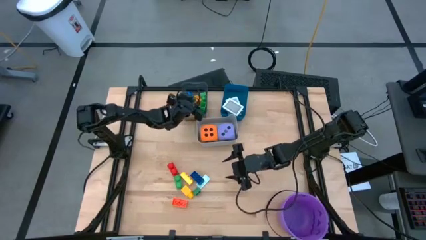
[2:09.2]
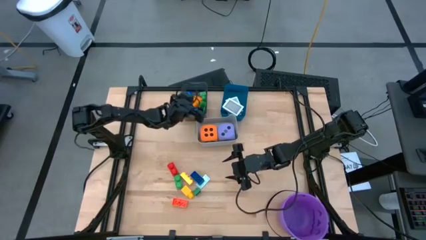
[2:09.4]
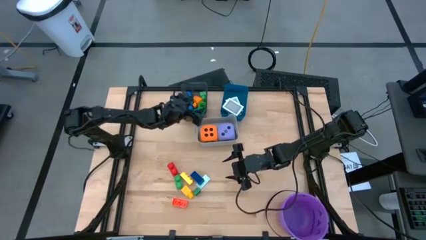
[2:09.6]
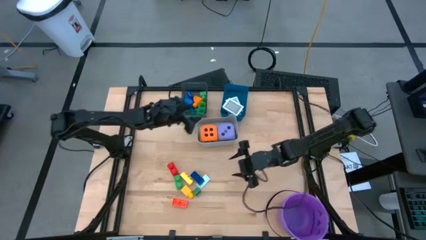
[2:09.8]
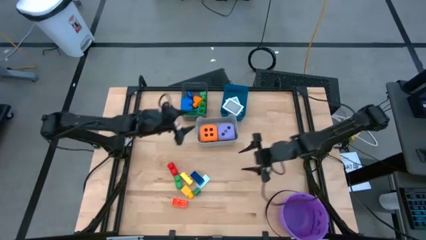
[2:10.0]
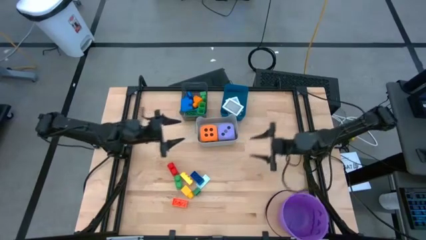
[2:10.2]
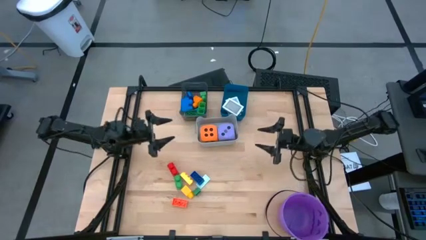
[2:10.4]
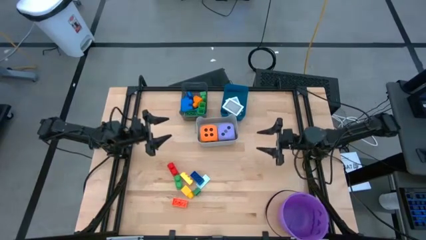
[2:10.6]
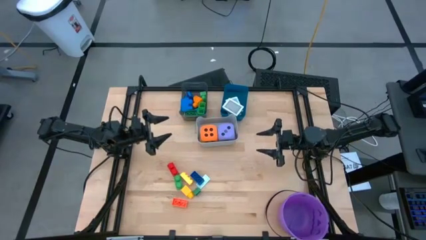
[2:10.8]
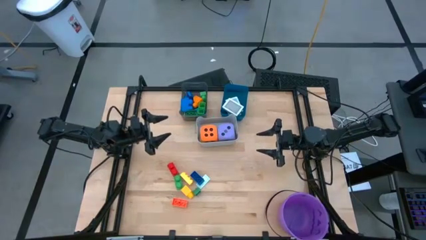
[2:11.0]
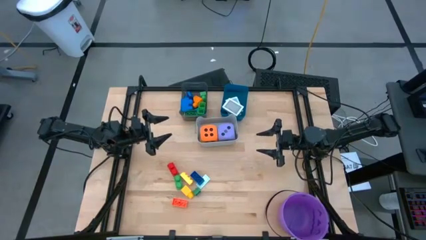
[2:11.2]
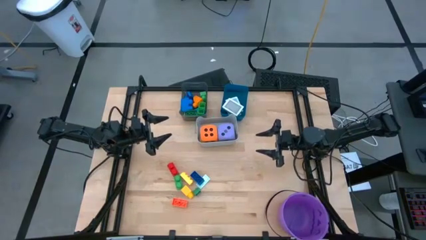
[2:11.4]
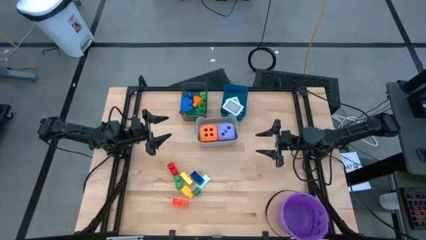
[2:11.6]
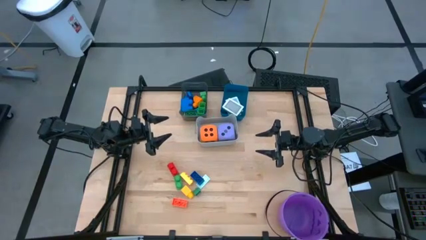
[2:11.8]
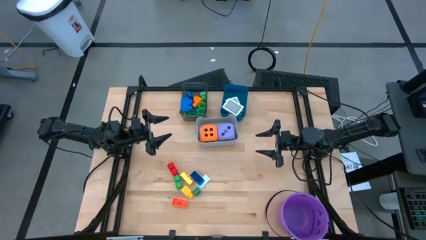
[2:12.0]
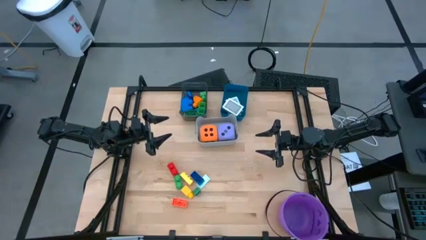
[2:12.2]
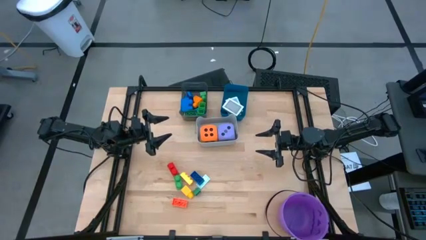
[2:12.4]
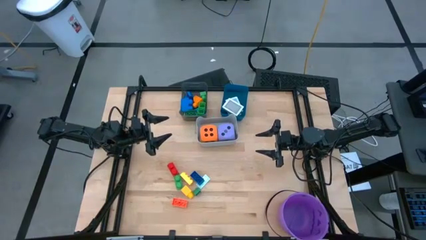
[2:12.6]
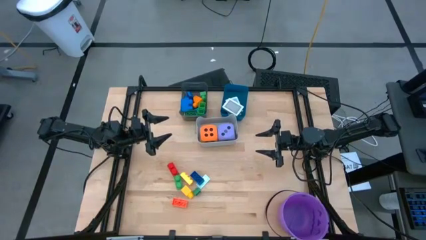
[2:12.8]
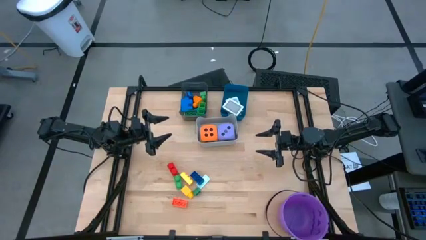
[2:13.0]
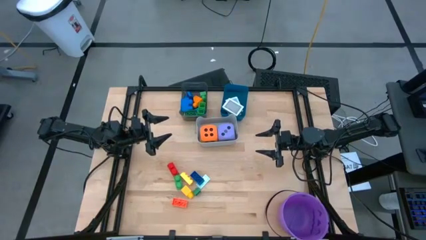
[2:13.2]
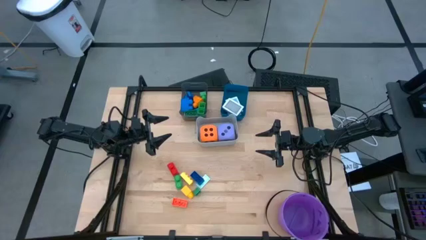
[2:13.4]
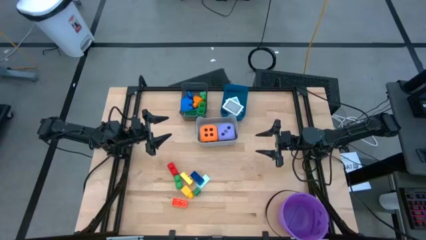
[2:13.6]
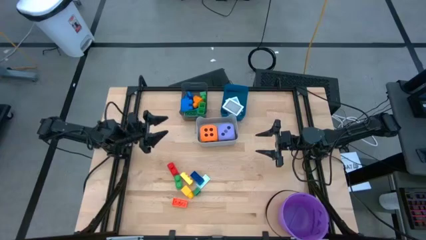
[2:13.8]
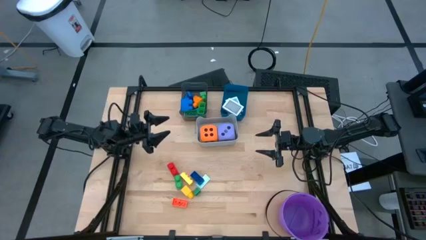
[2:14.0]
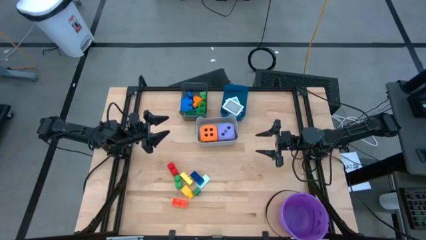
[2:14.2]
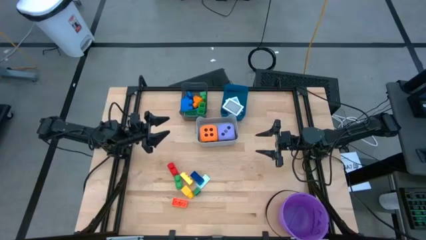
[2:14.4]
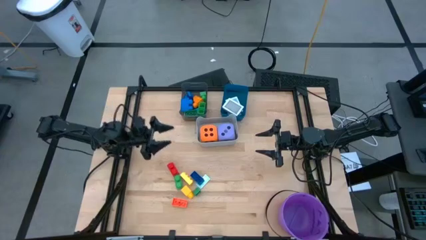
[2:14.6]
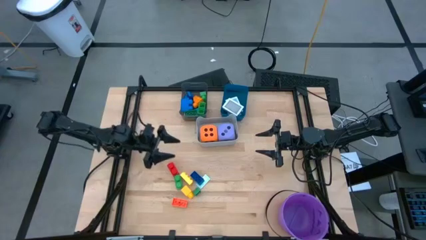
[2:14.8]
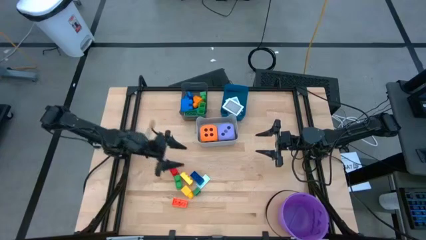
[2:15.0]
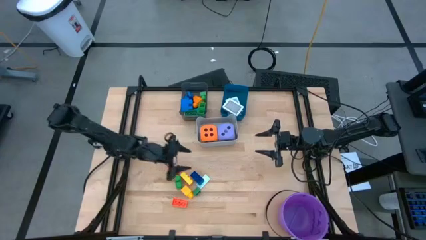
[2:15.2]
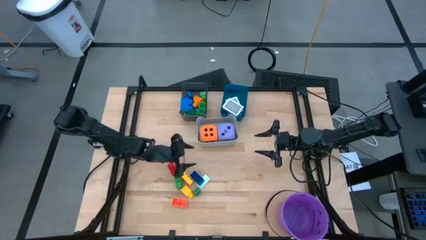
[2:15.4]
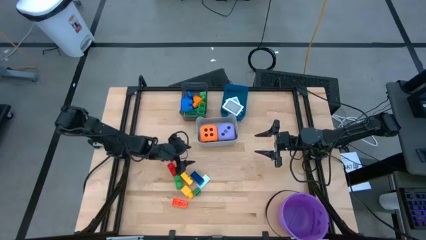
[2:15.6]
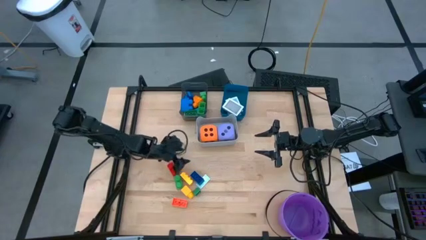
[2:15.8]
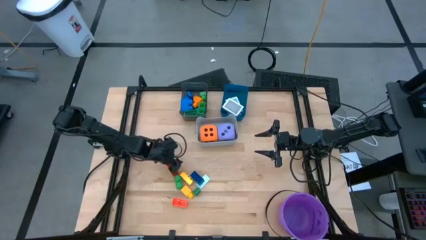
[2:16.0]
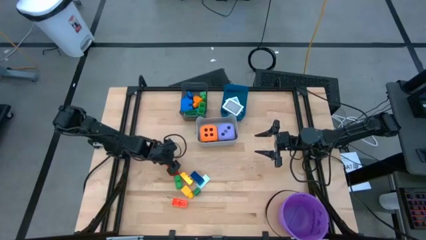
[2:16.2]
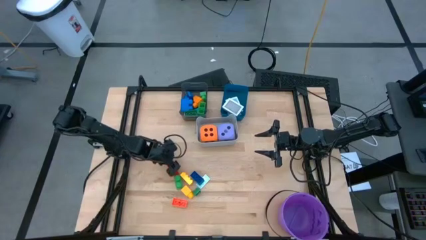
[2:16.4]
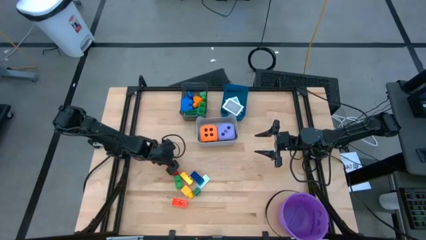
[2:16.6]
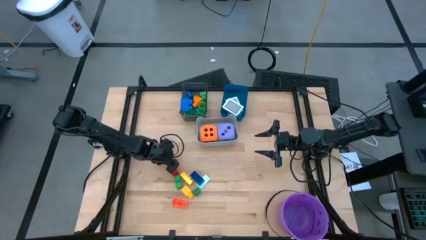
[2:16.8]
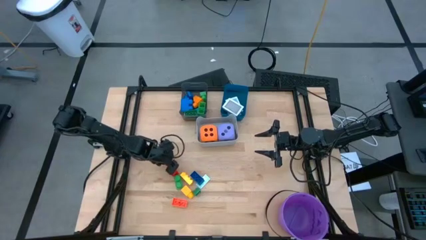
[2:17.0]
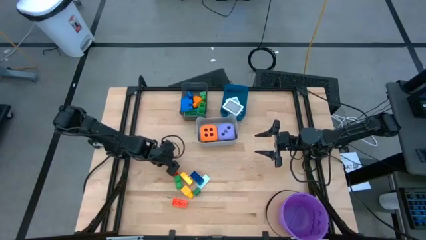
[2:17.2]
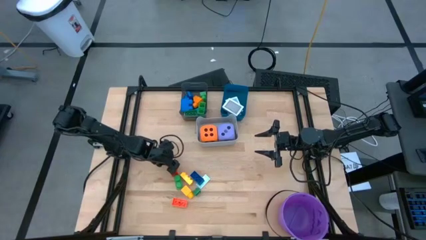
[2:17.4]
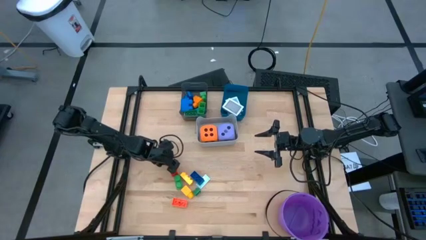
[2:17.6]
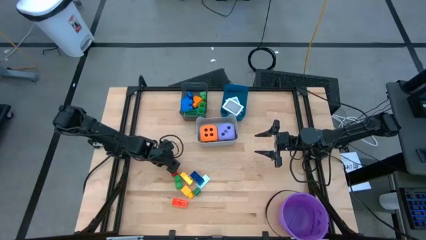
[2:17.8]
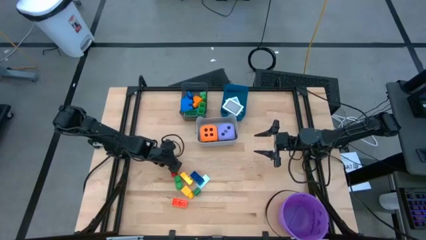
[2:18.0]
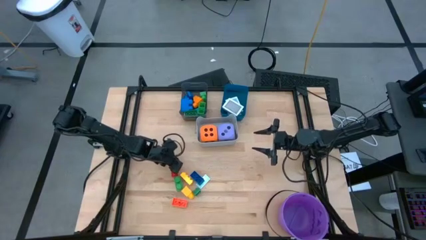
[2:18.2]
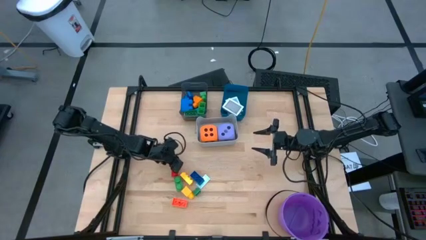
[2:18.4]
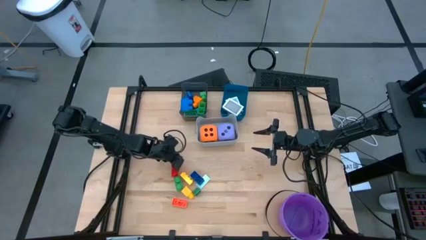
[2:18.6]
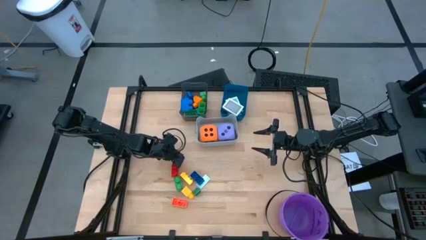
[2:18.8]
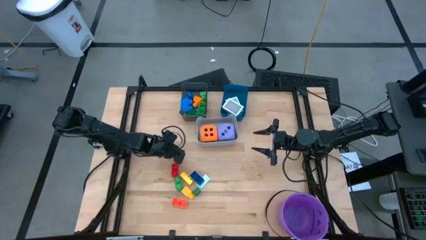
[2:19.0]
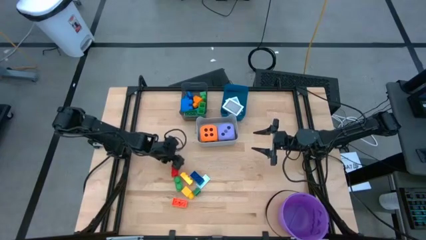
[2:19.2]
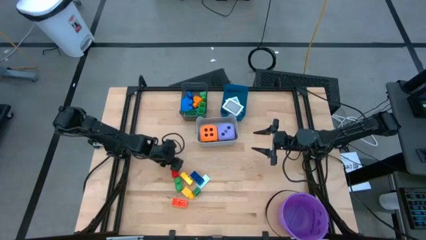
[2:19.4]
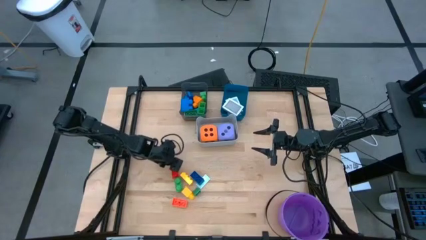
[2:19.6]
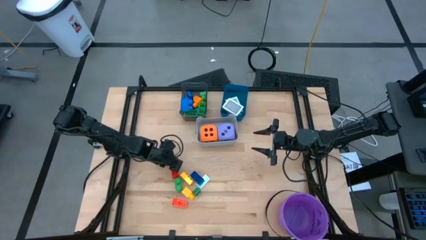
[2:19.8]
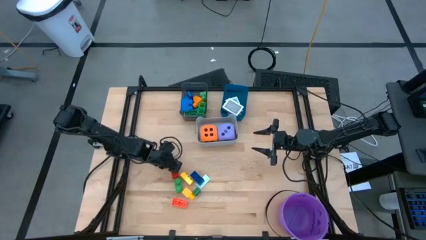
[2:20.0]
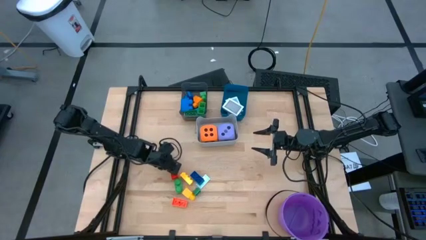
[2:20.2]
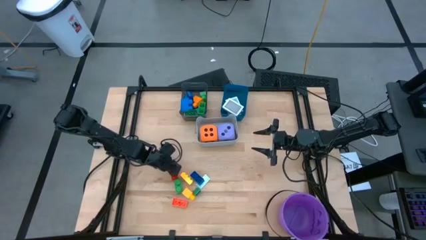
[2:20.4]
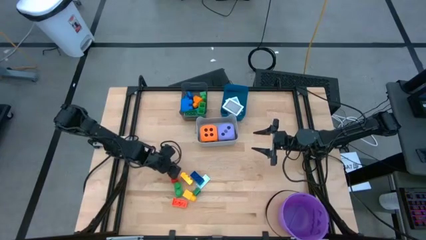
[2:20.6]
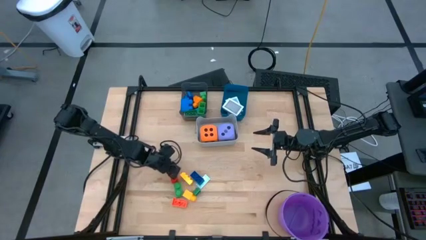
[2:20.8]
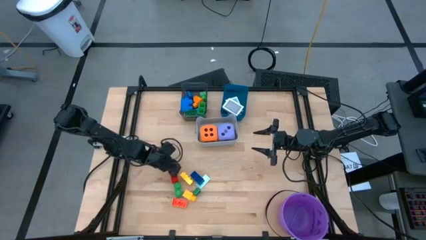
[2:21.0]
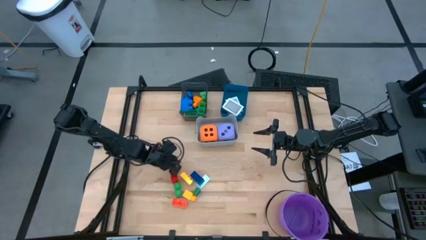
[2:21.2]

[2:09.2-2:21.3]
Task: Pick & Place Toys
Put the red game piece into the black bin

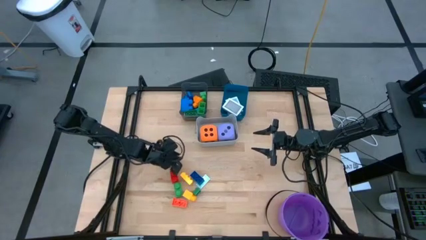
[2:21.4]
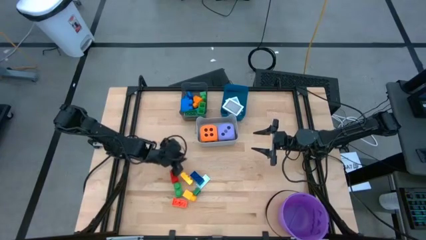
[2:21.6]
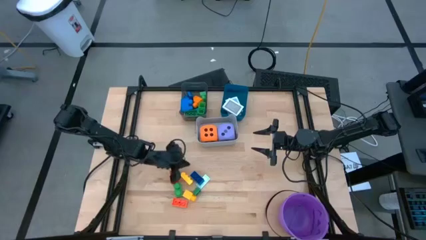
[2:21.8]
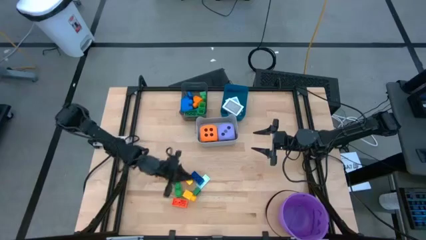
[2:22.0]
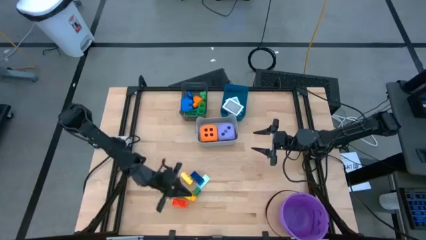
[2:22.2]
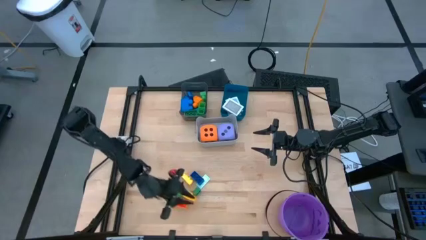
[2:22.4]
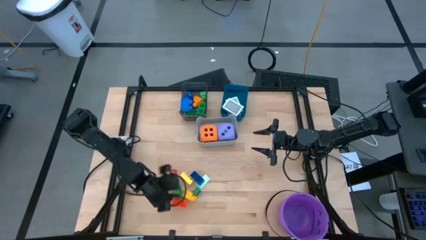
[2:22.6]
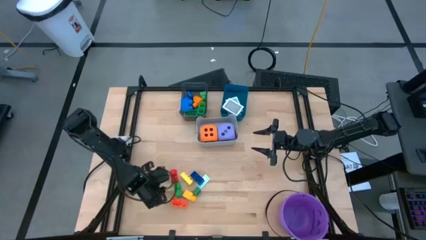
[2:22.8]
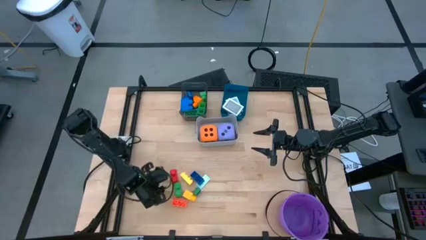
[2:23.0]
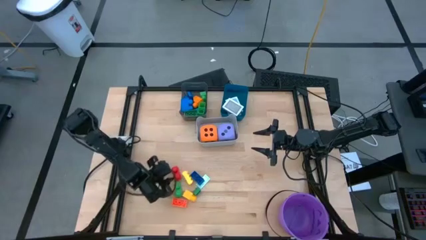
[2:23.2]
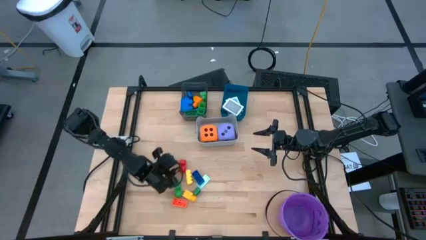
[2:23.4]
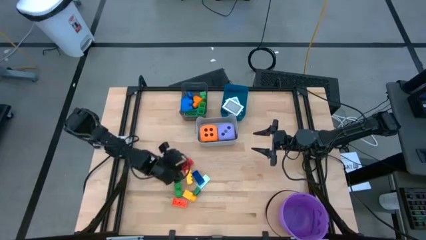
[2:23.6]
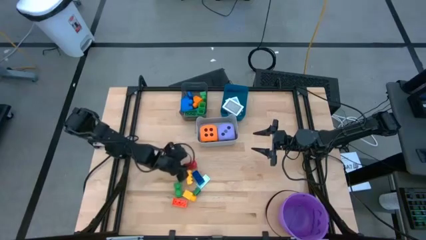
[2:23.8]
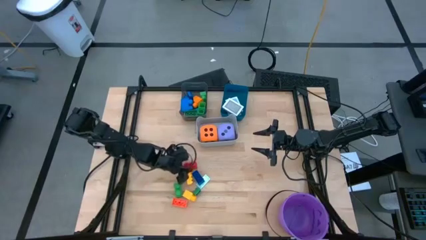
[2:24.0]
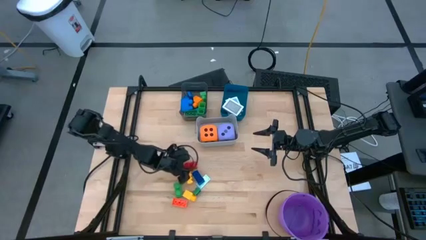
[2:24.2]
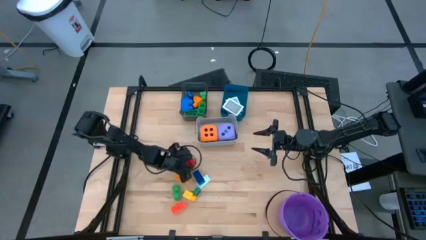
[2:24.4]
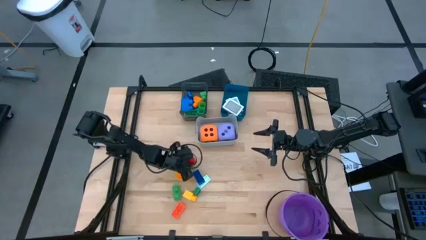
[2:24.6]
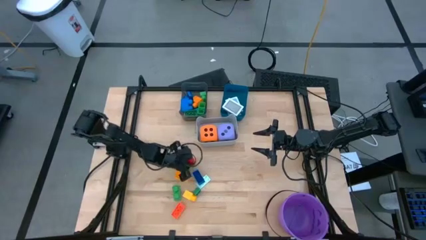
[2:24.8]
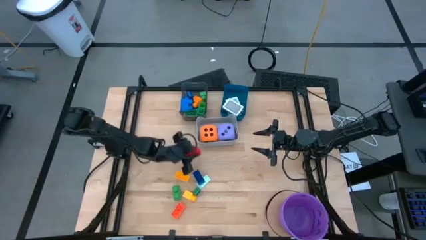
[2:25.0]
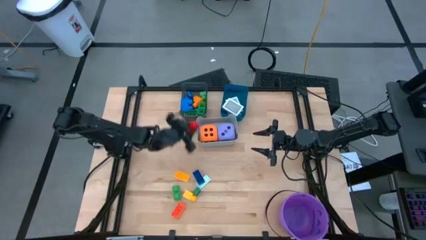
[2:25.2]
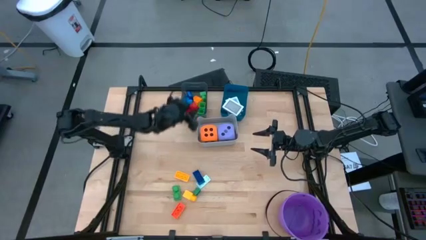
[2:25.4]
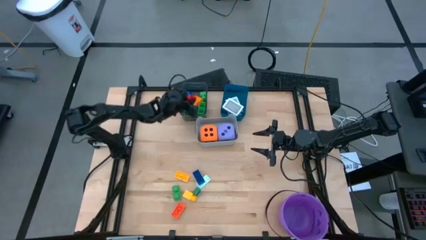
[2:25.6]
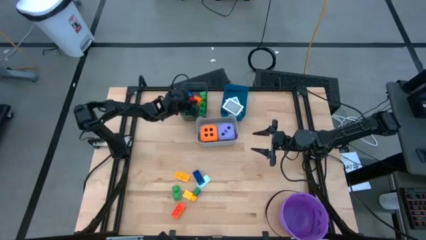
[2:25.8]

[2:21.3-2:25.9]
Put the red game piece into the black bin
